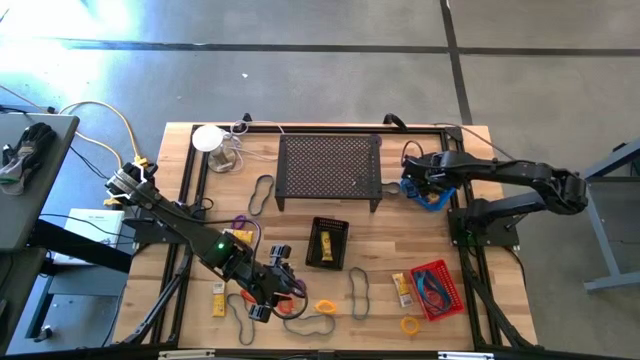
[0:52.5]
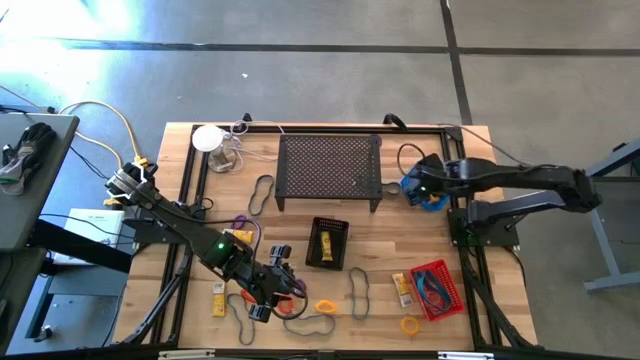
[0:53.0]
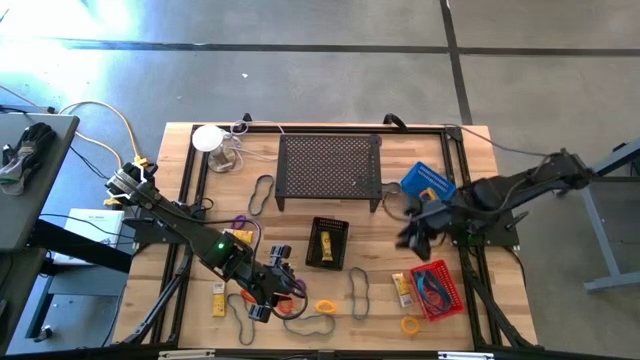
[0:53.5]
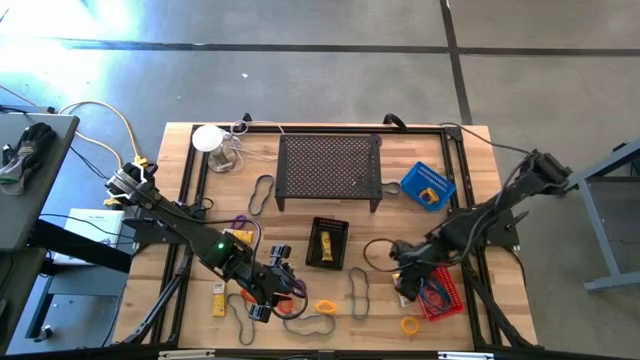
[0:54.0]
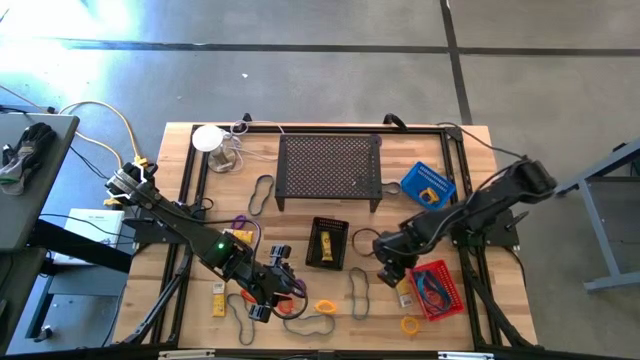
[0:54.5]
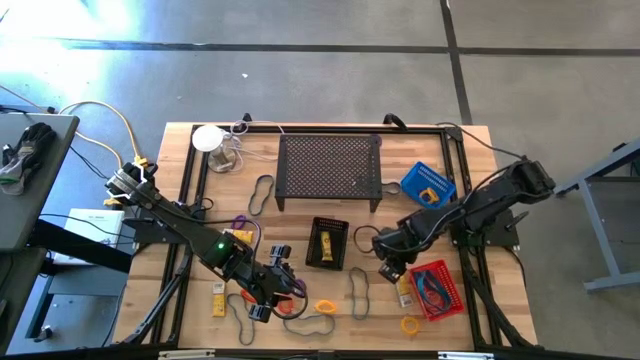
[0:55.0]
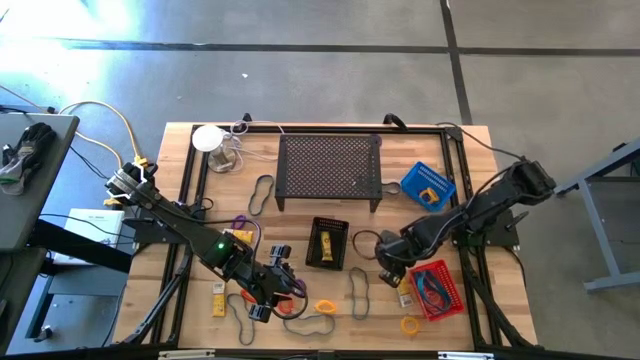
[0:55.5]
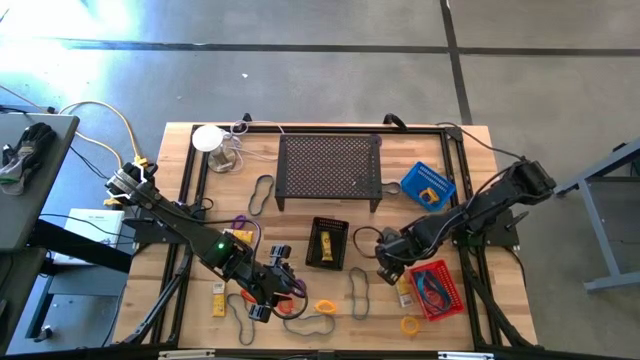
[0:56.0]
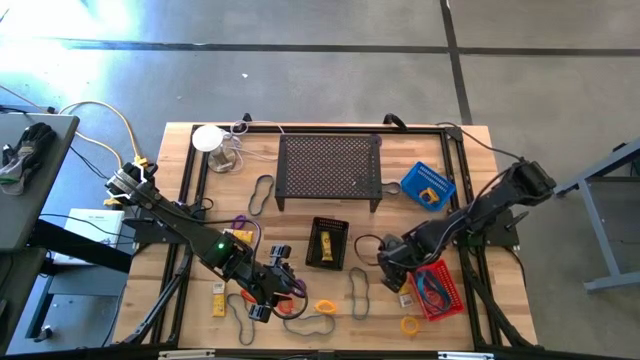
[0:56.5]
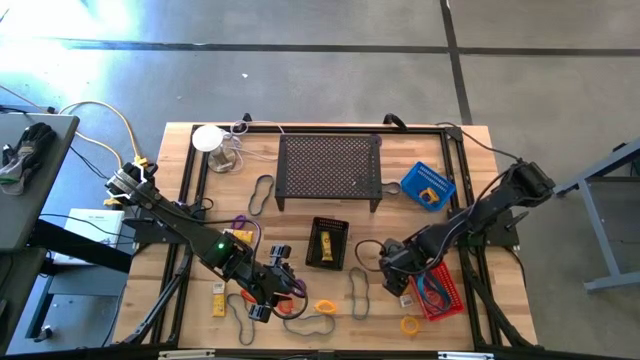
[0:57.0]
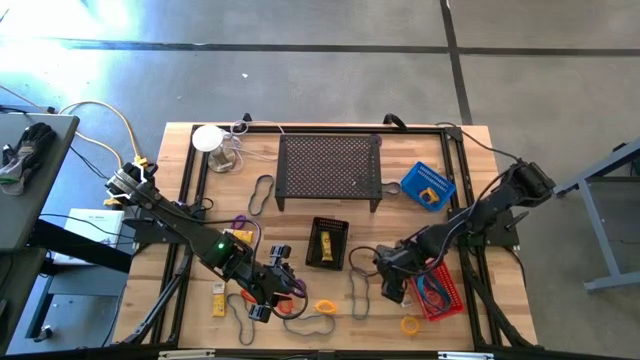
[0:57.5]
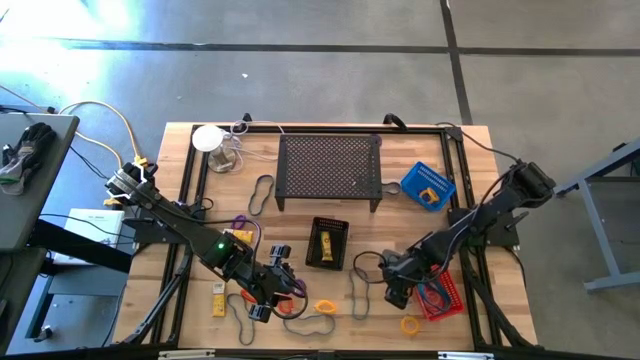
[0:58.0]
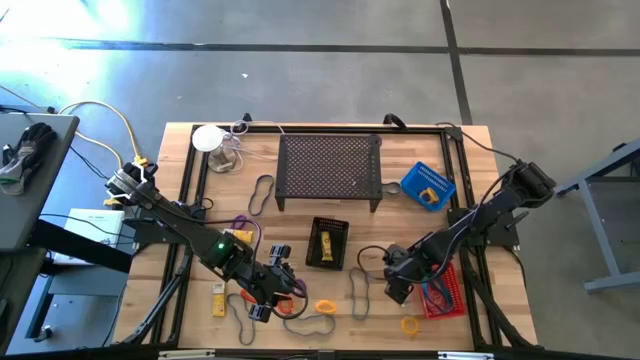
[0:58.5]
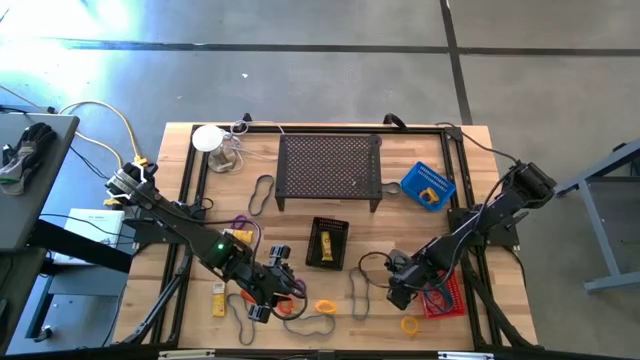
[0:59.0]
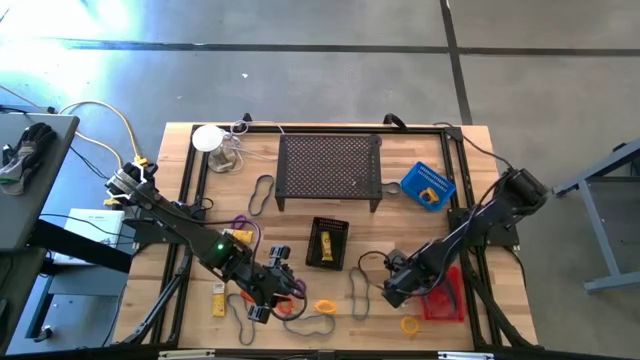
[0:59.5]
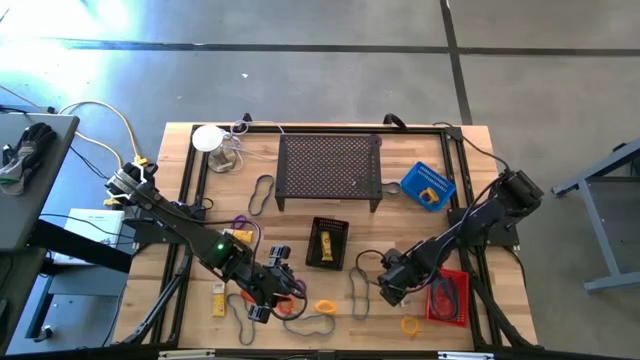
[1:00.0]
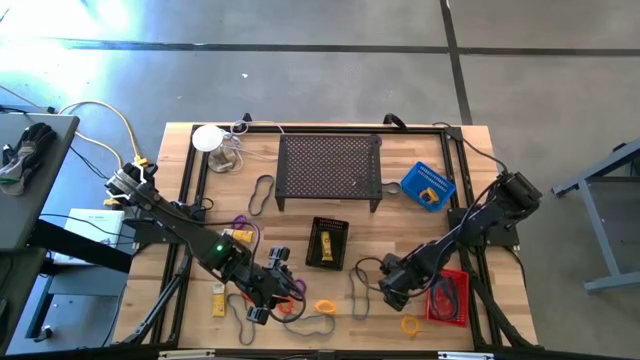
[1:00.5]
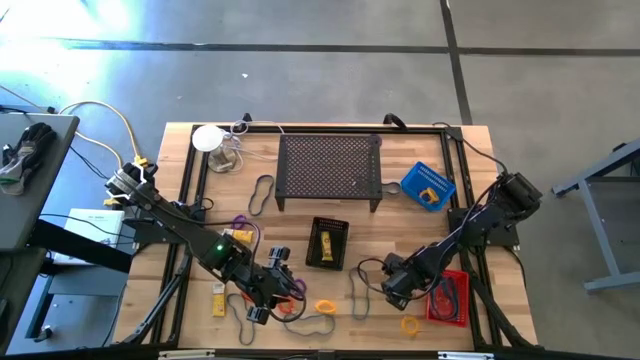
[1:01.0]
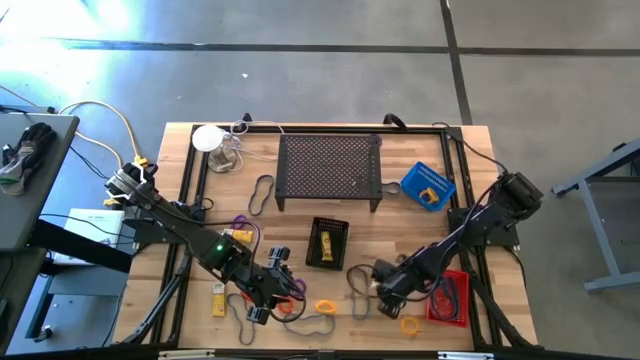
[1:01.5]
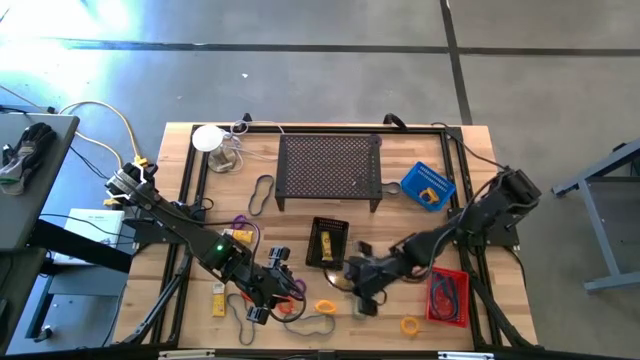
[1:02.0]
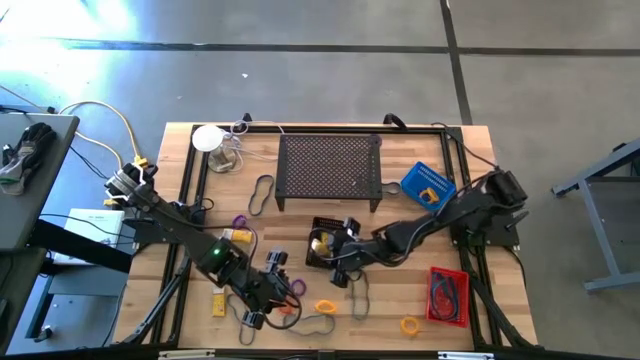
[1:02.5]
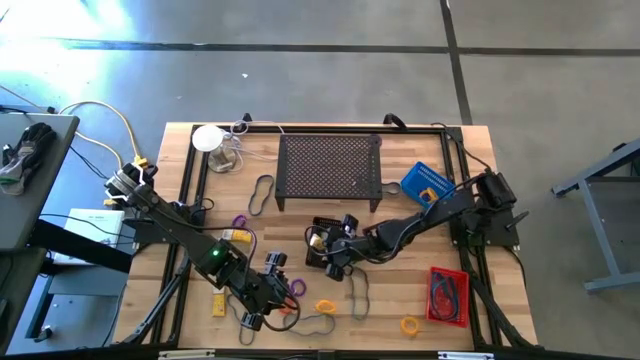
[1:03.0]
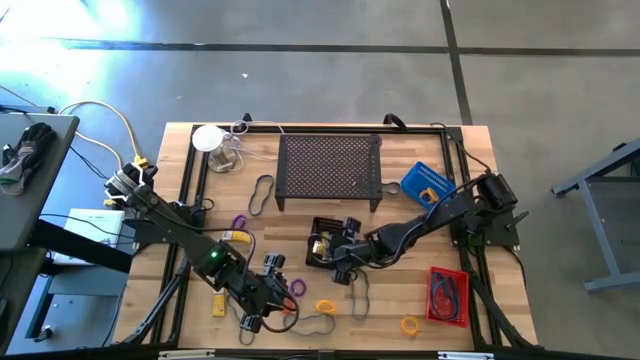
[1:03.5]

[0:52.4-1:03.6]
Task: Pick & Place Office Desk Supplies
Put the yellow crayon box into the black bin

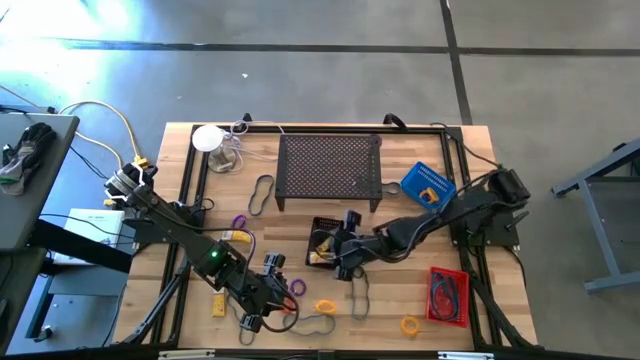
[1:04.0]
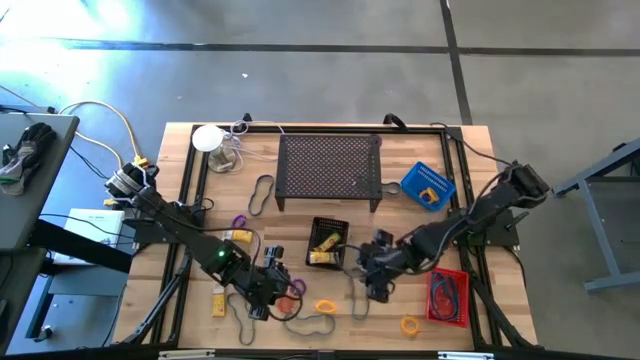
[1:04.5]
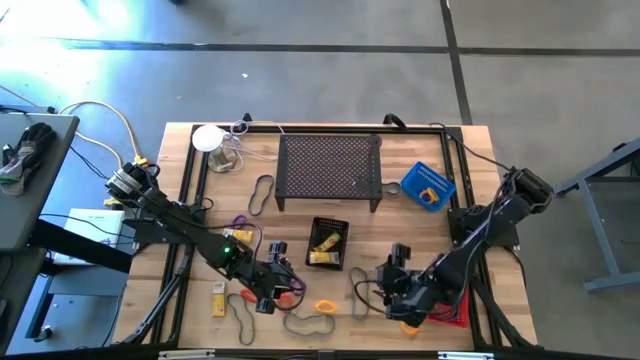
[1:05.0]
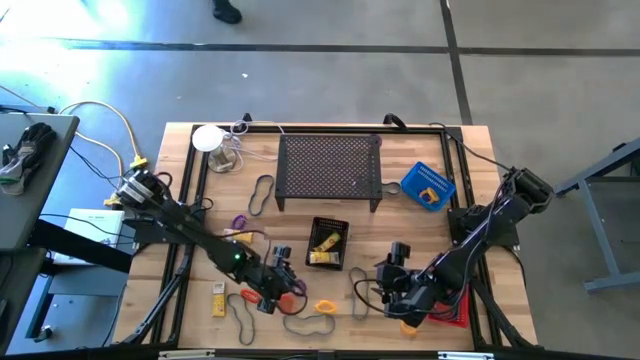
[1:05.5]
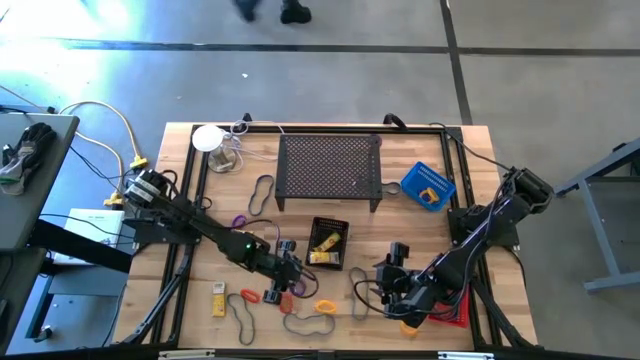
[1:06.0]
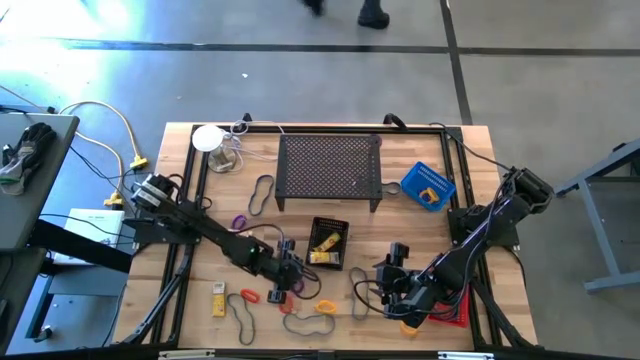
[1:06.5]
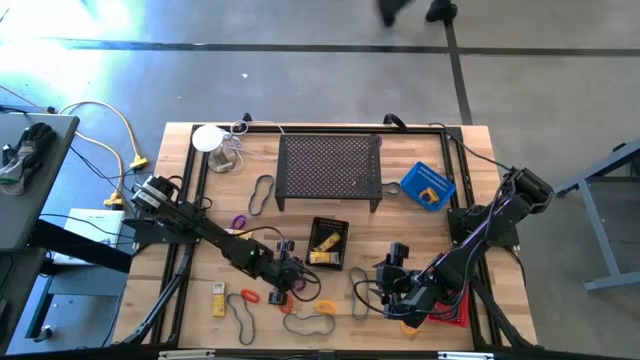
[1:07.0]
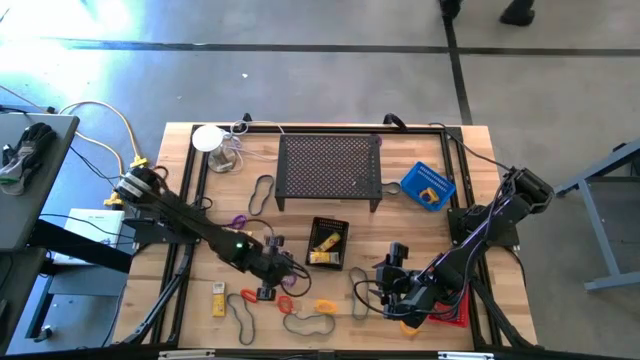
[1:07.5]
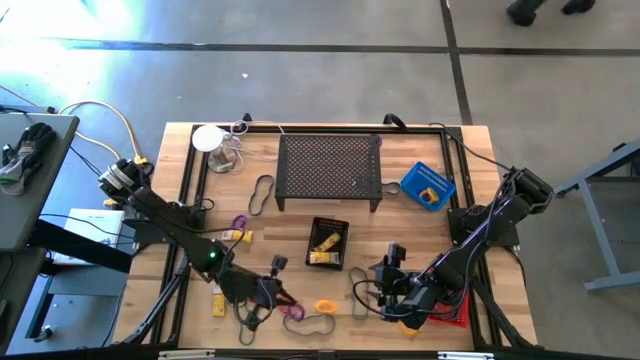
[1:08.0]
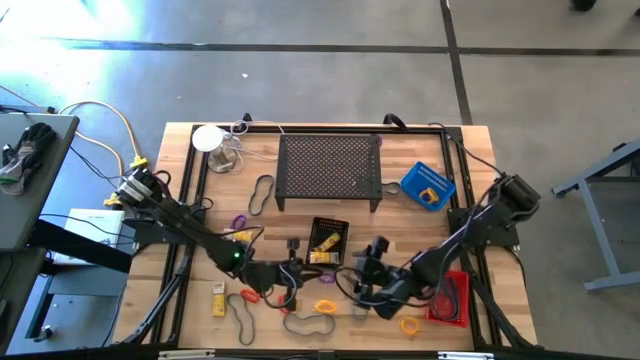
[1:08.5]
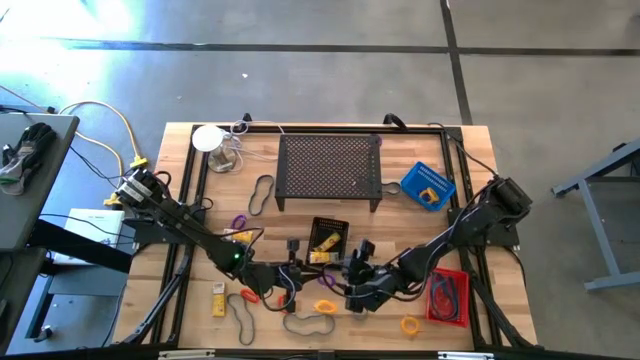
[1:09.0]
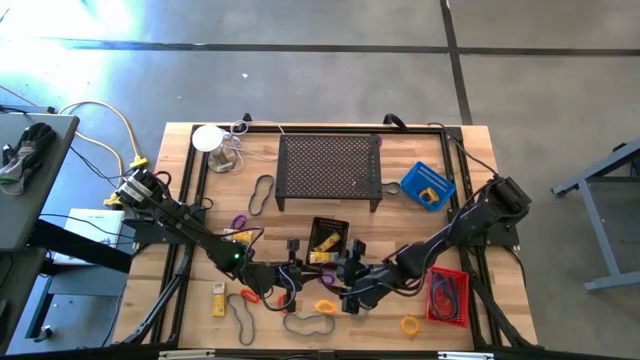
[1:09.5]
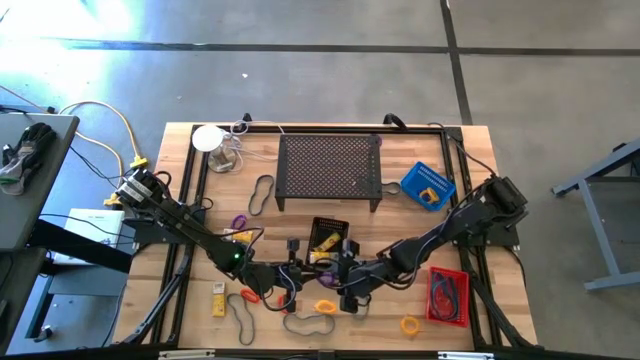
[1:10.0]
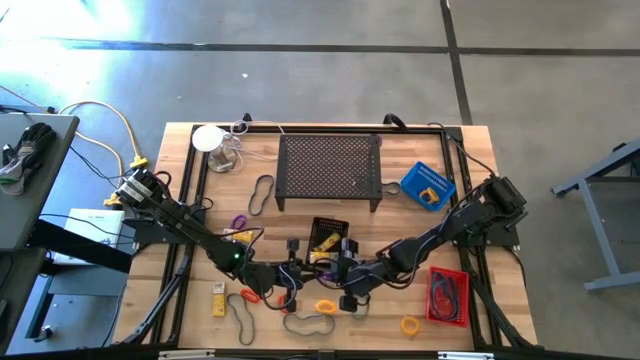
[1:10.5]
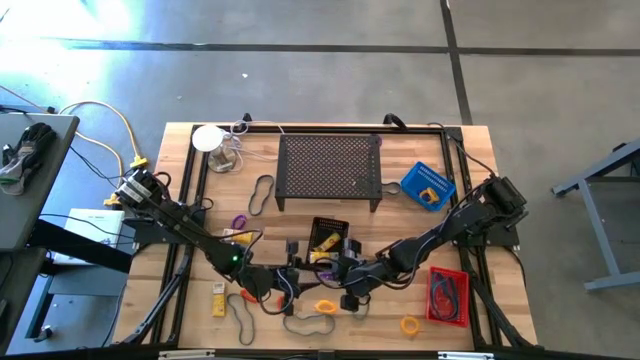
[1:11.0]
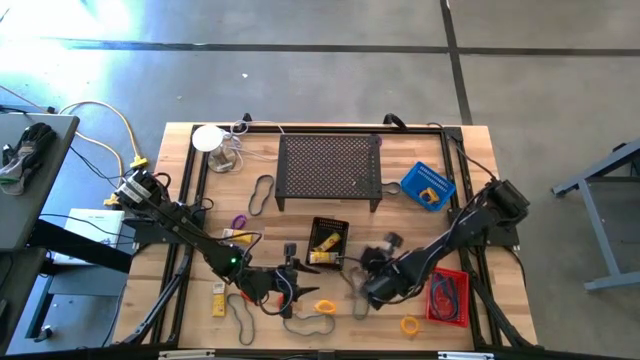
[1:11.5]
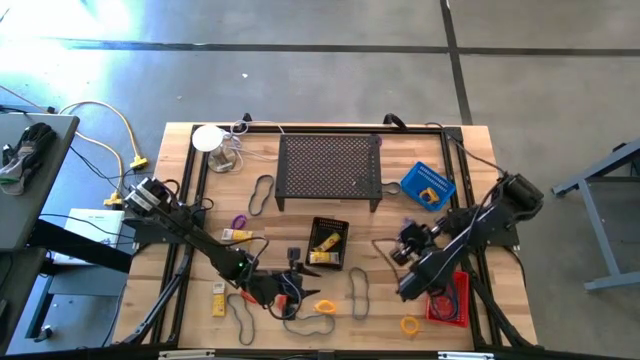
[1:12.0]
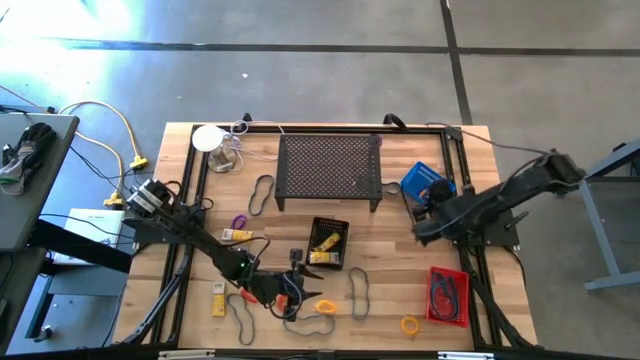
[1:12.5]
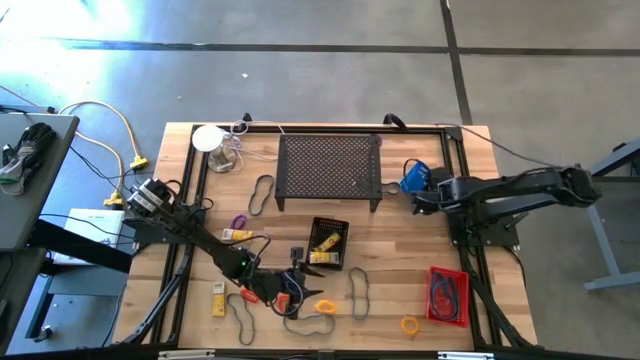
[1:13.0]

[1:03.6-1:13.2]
Put the purple spring keychain into the blue bin
